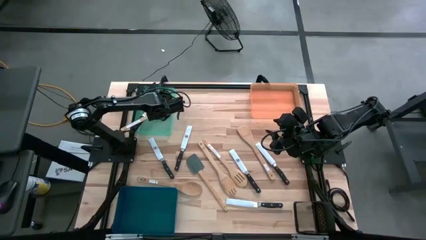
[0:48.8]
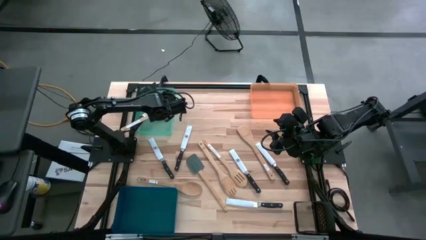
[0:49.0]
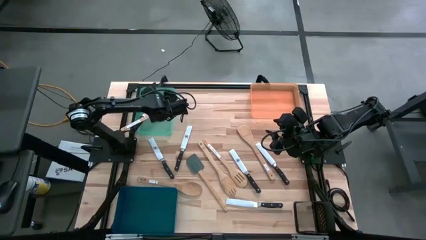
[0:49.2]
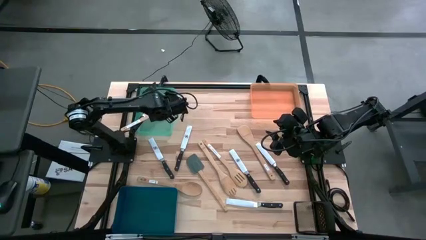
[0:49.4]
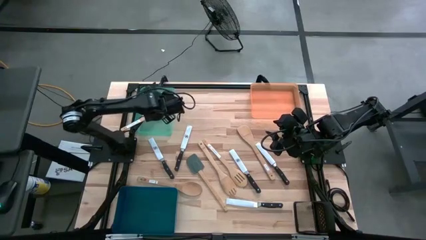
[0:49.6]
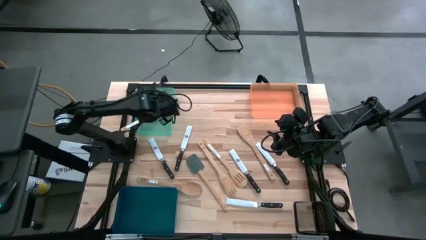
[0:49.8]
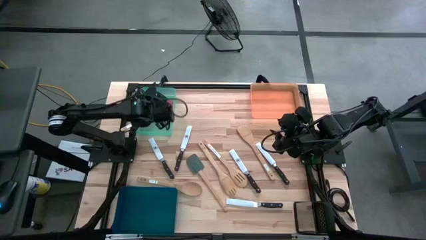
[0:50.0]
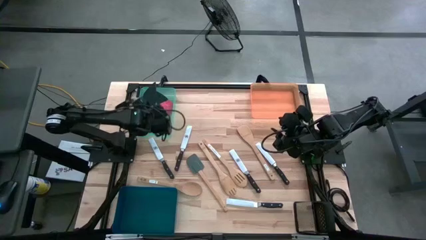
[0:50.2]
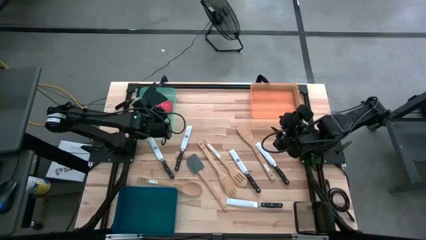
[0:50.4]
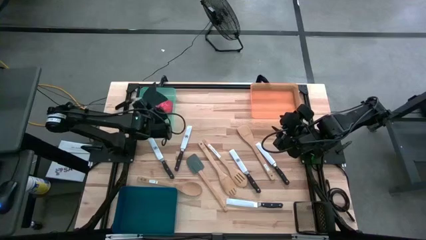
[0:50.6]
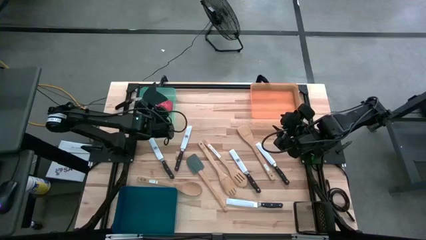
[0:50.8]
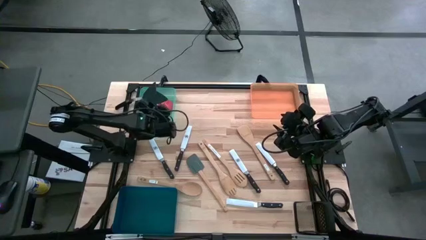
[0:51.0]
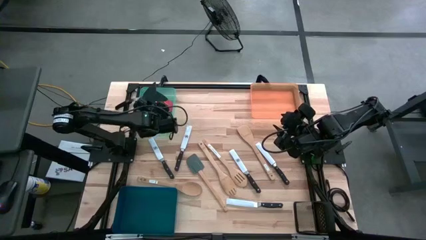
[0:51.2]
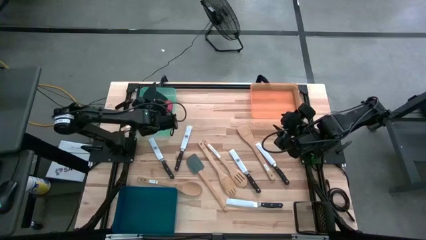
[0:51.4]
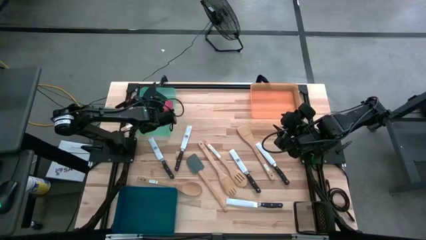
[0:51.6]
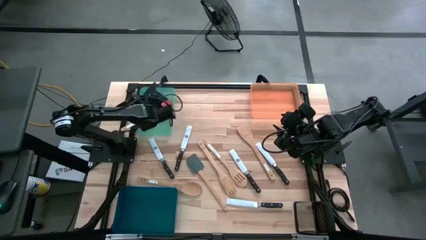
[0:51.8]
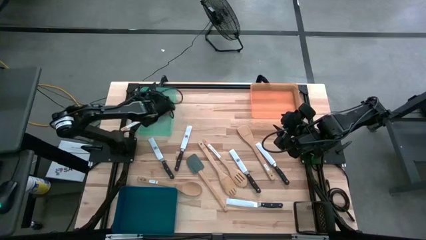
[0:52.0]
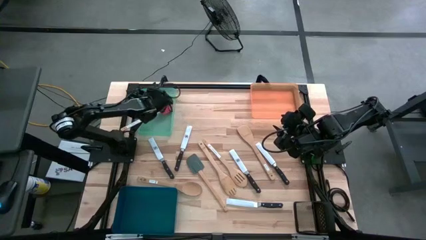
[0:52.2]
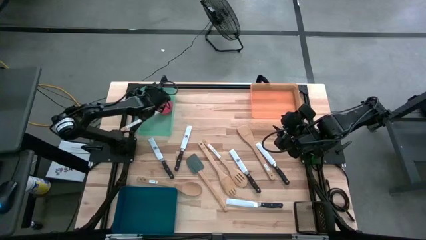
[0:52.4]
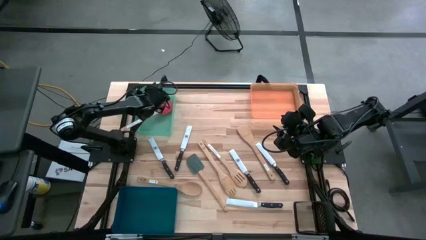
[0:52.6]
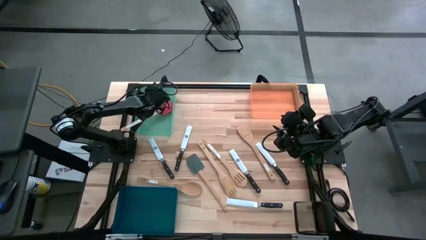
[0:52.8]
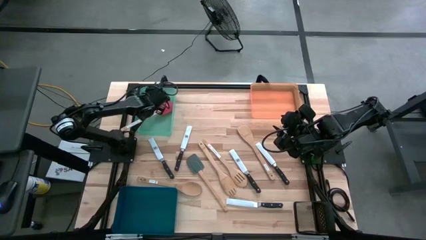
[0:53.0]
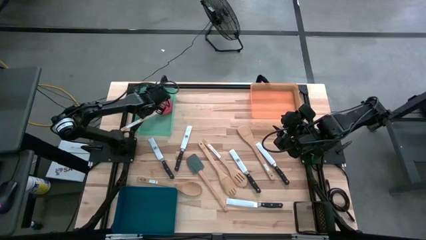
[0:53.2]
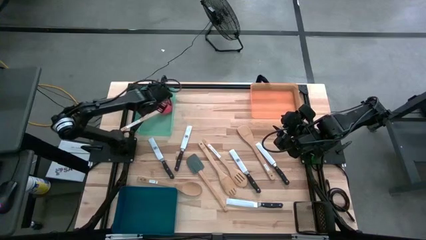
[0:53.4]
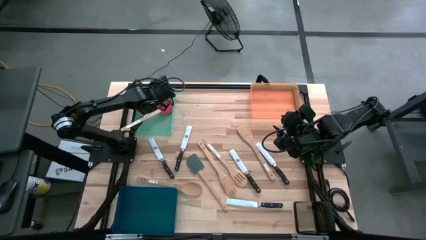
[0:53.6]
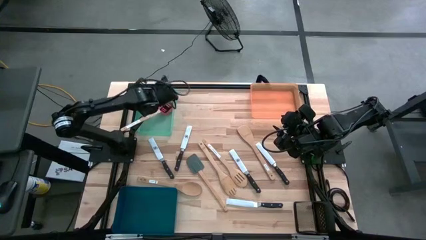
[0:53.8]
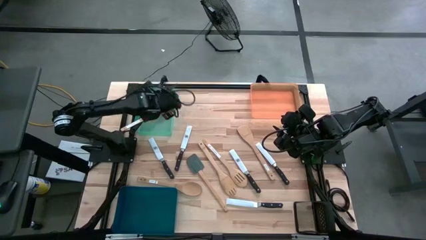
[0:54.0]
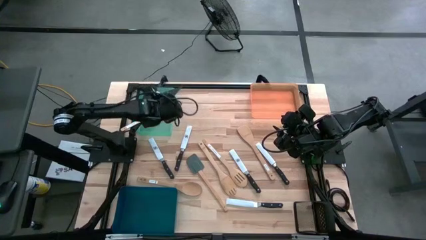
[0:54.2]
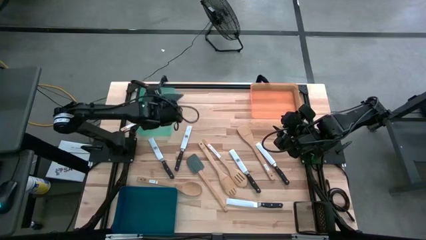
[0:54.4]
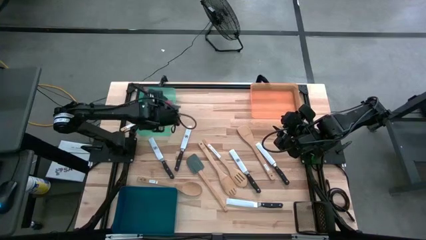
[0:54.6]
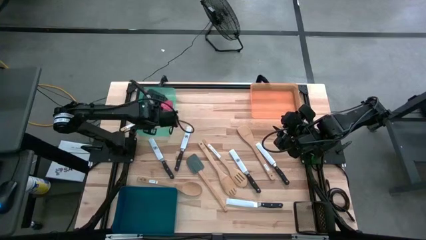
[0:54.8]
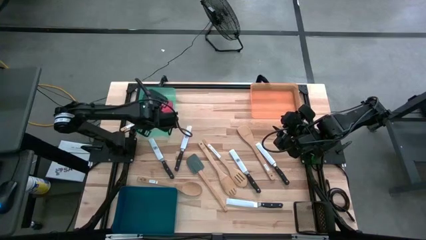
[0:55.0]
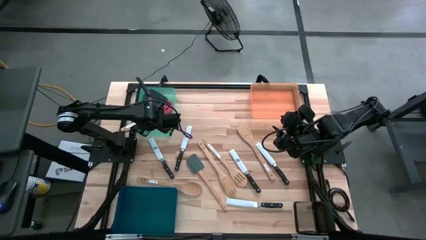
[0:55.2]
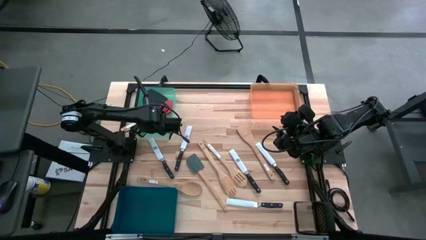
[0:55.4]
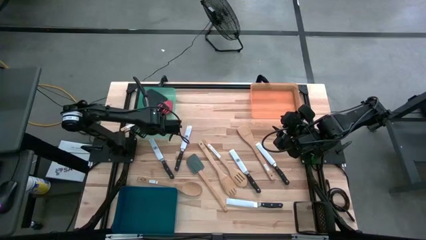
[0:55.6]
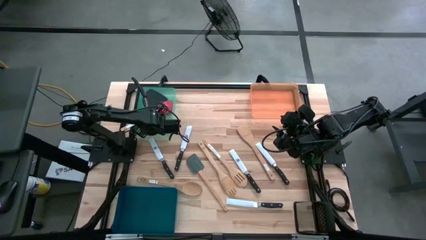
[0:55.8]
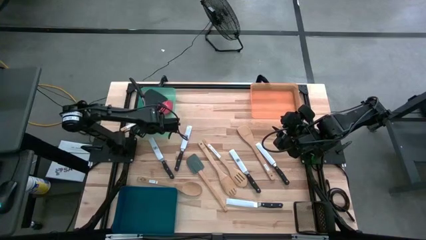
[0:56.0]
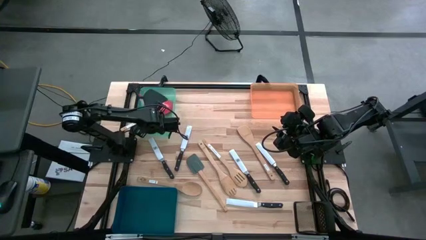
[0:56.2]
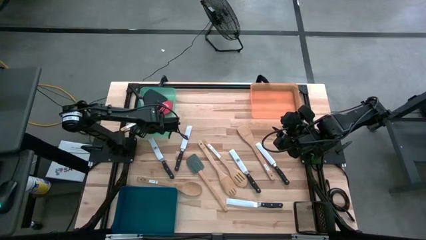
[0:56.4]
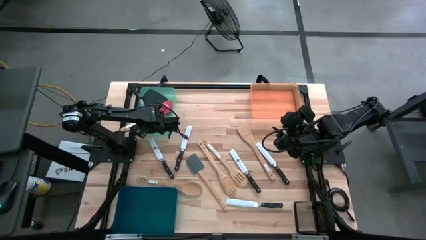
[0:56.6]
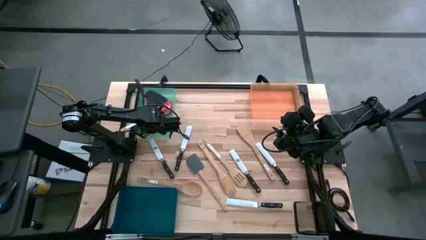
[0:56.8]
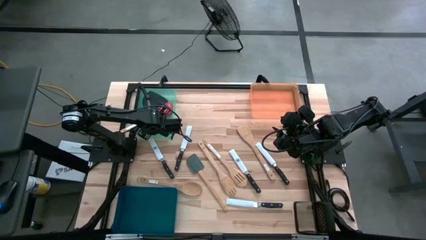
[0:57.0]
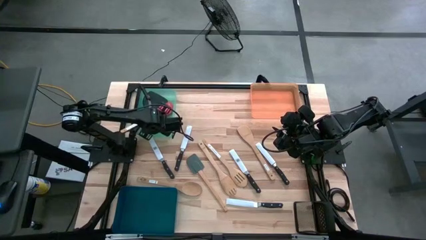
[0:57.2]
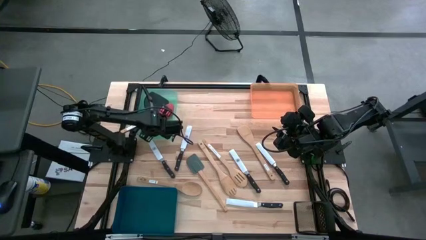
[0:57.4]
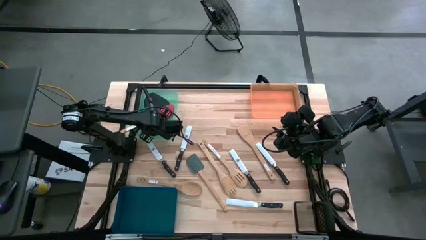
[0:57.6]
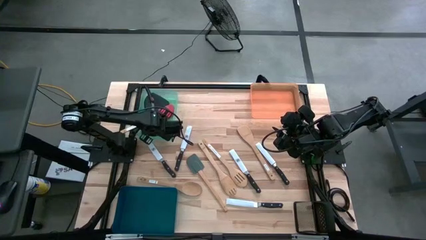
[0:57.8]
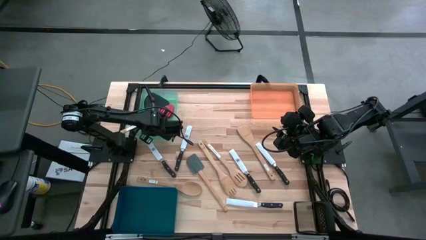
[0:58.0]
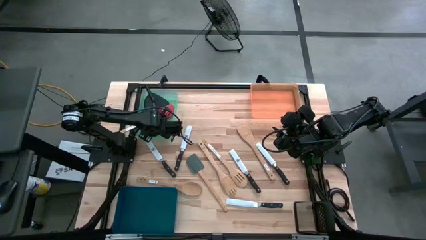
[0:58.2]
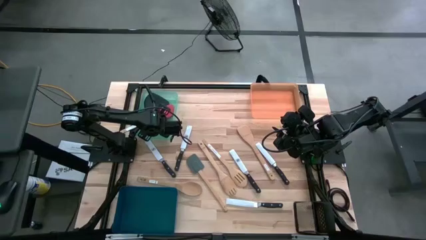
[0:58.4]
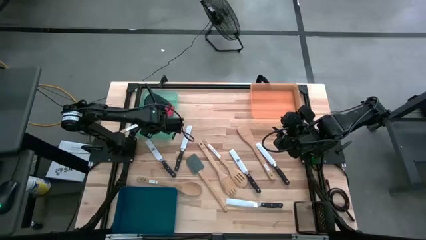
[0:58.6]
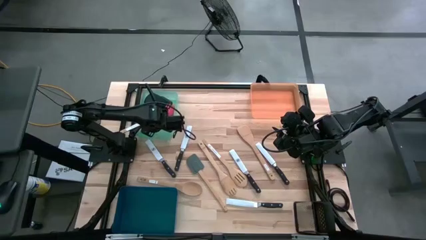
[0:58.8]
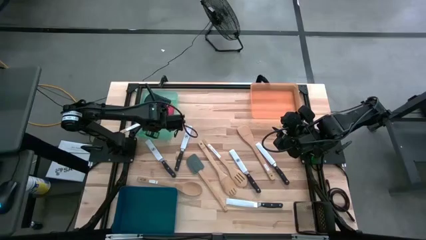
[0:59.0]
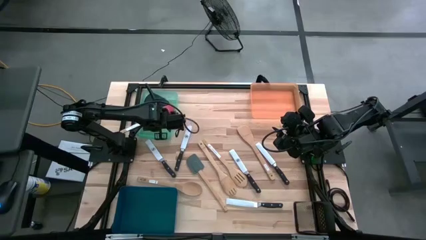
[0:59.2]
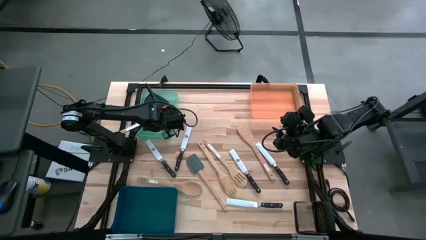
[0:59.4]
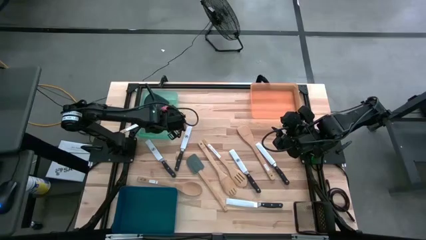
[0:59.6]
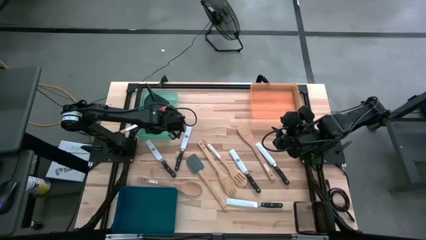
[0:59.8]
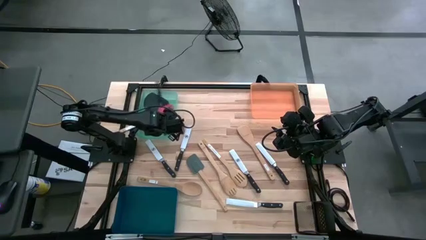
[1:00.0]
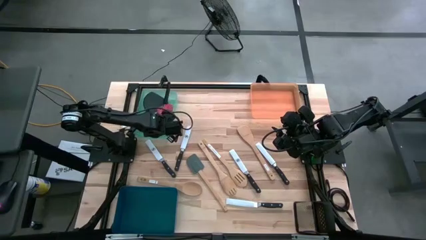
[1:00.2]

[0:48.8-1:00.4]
Task: Pick & Place Kitchen Items
Put the black turner spatula into the blue green bin

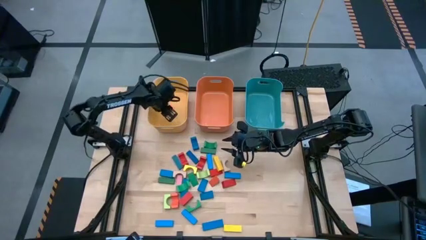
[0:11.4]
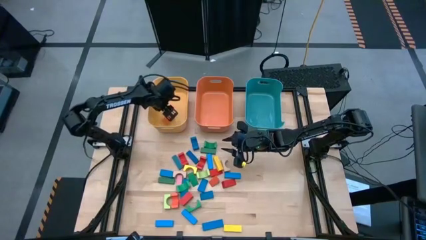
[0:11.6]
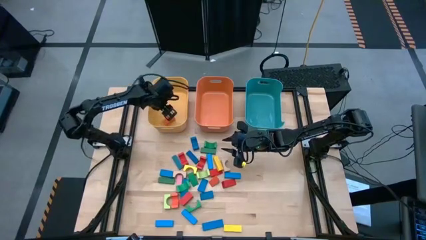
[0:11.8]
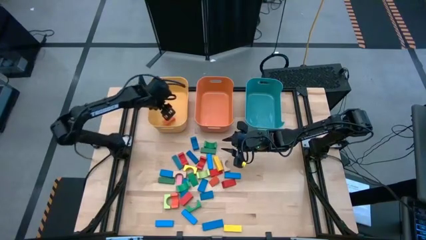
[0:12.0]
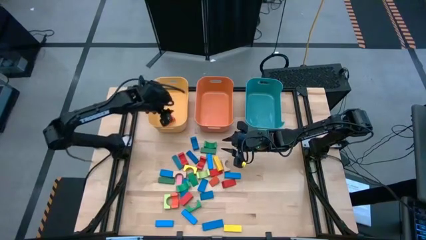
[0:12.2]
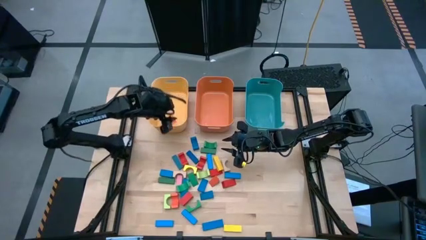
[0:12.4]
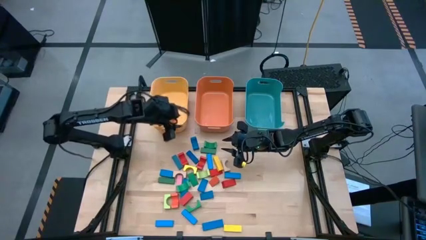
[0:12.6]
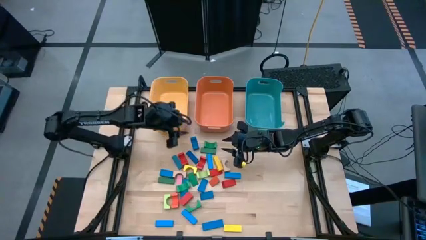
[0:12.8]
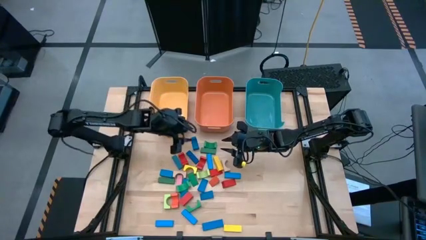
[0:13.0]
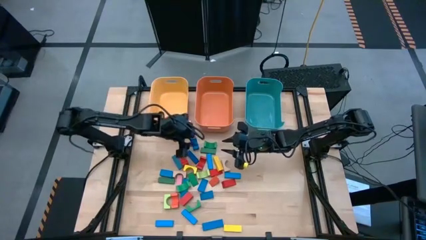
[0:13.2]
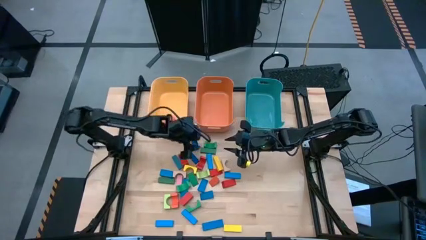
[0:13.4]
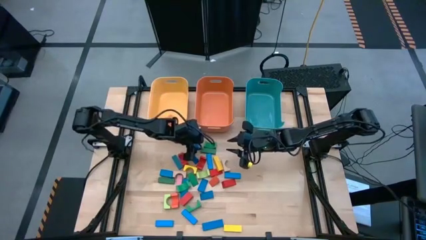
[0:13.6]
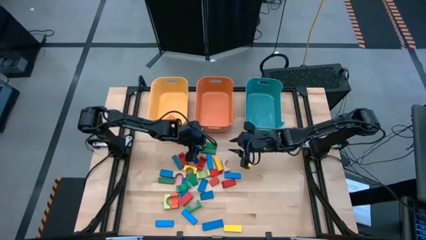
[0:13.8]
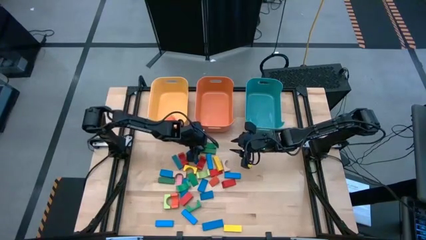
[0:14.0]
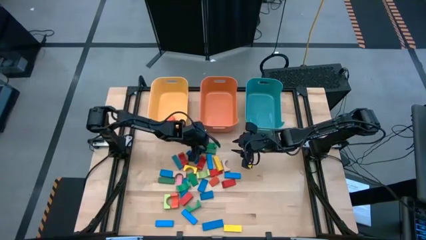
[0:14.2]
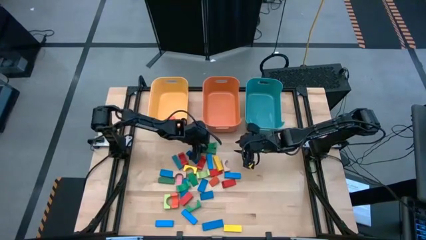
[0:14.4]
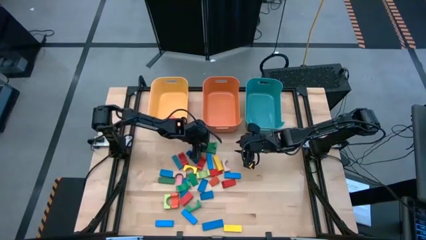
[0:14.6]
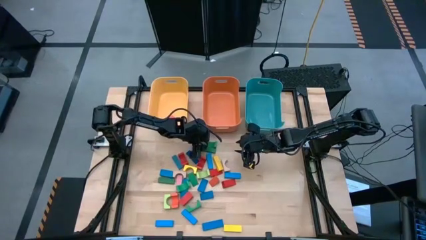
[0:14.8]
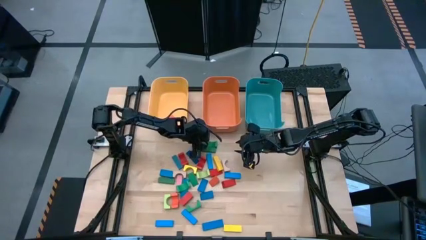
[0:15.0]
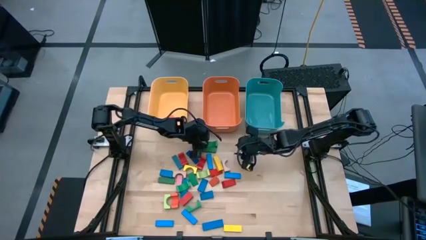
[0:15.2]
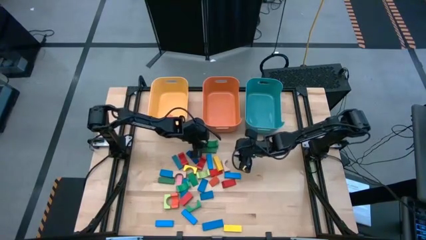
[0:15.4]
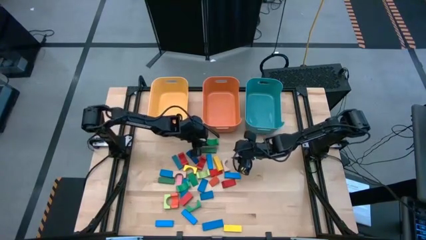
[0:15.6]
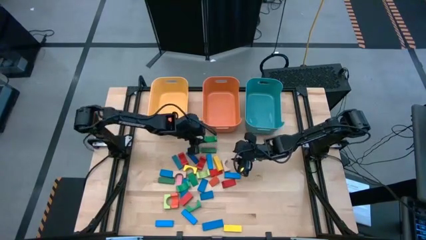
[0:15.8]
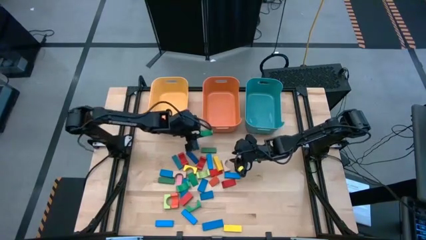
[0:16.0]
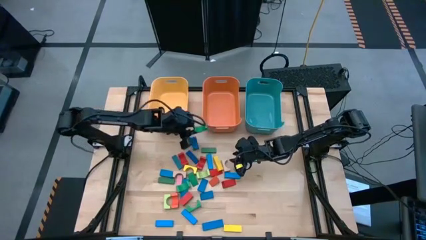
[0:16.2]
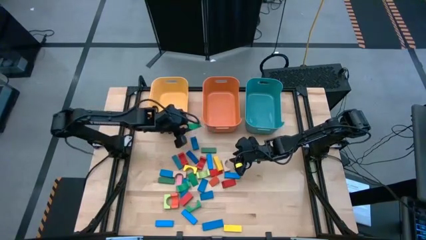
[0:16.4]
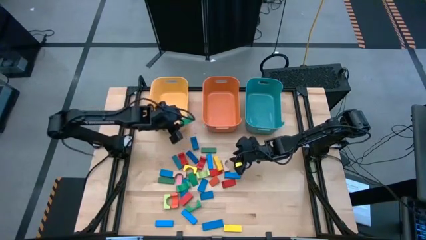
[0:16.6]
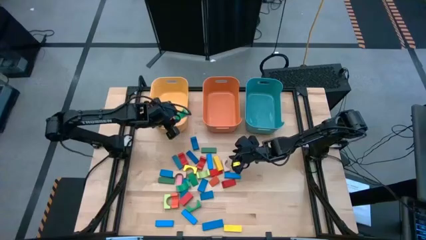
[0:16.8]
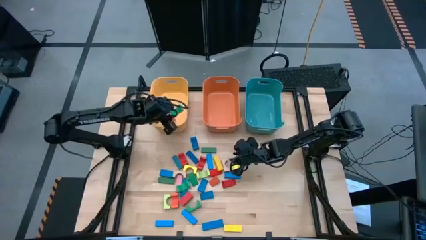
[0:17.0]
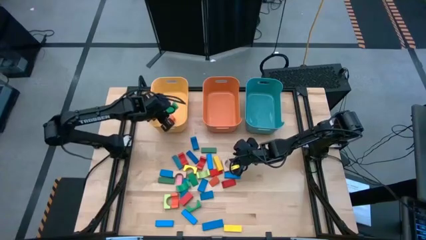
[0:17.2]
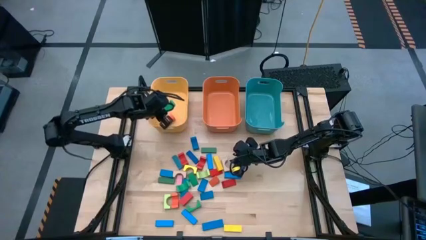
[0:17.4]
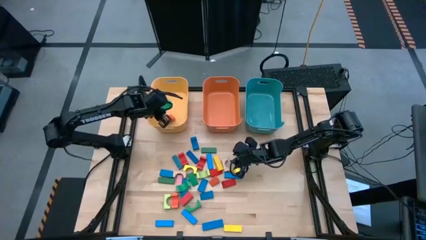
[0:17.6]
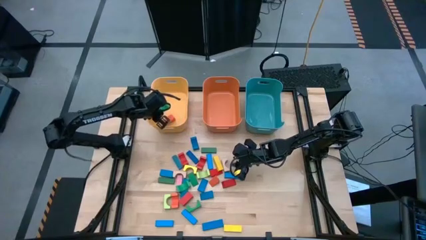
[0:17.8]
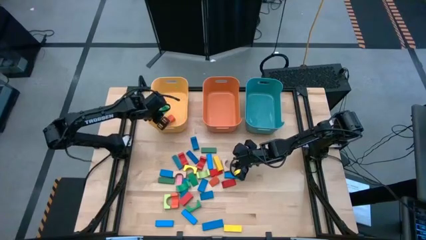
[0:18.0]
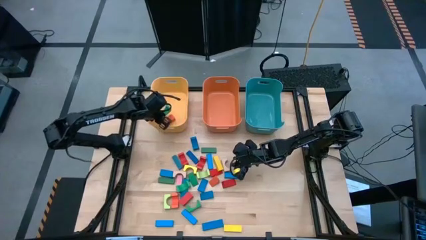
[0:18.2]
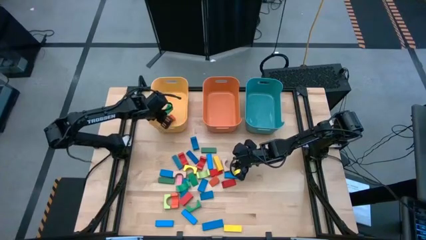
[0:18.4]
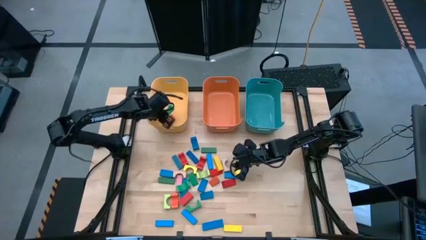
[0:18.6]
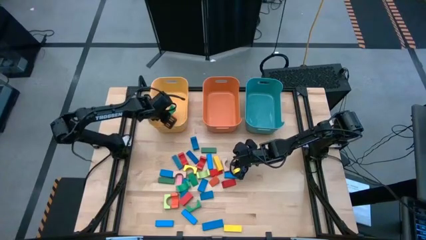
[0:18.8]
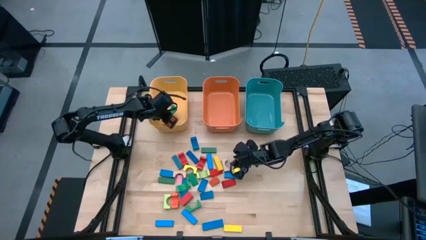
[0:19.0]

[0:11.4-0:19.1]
Task: Sort blocks by size
Put the green arch block into the yellow bin
